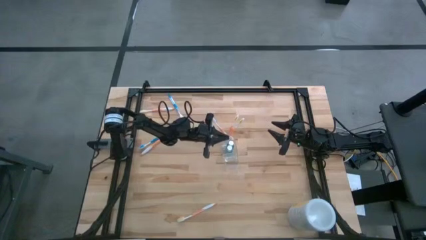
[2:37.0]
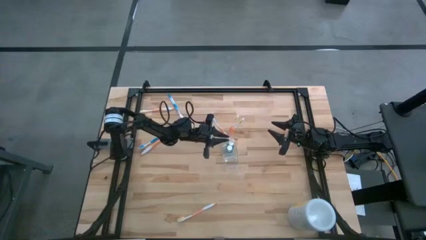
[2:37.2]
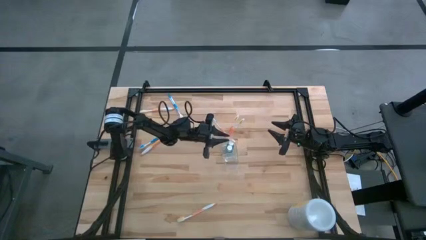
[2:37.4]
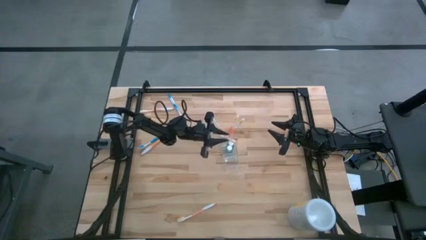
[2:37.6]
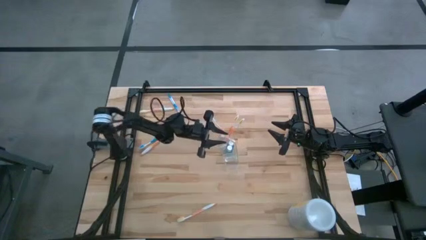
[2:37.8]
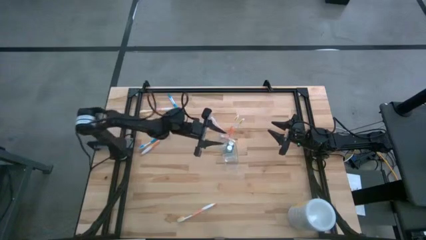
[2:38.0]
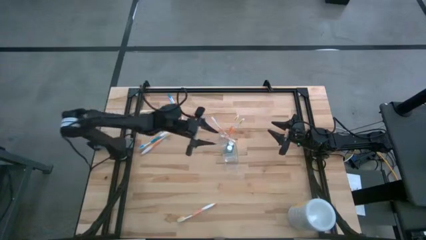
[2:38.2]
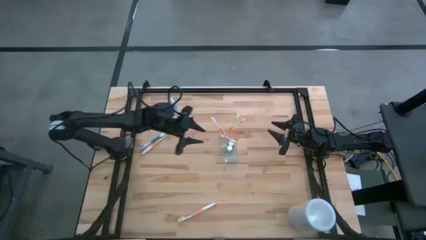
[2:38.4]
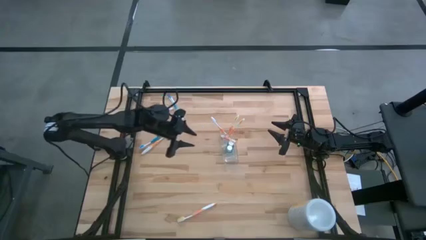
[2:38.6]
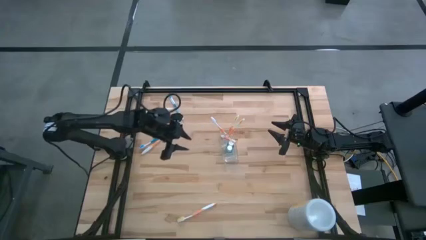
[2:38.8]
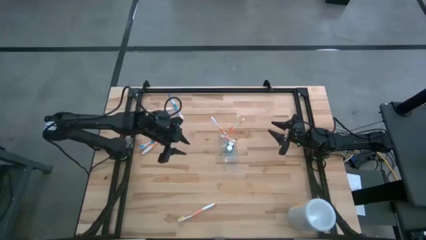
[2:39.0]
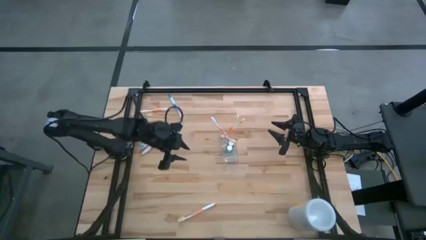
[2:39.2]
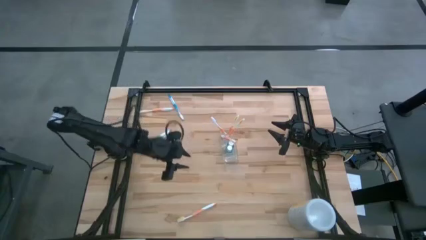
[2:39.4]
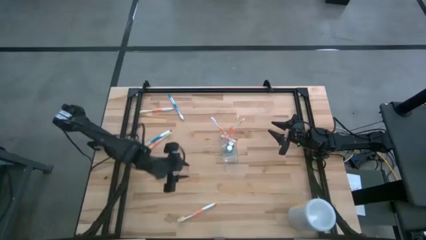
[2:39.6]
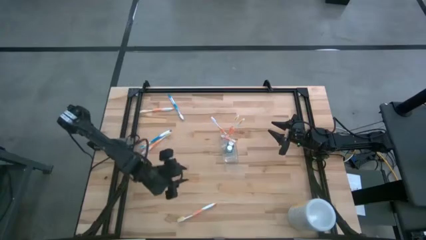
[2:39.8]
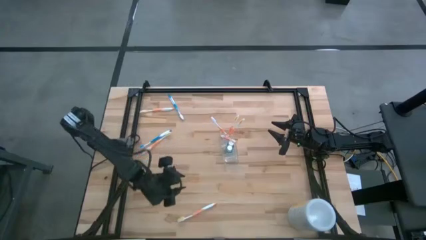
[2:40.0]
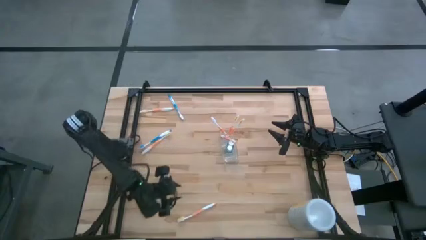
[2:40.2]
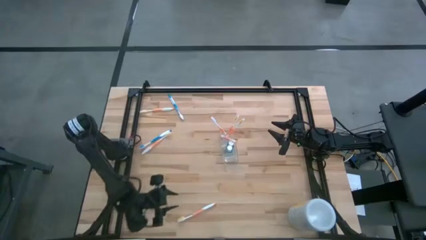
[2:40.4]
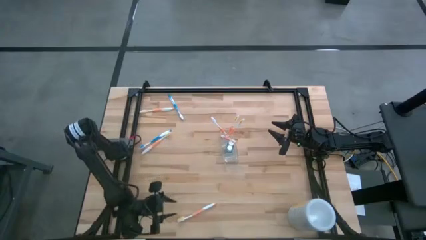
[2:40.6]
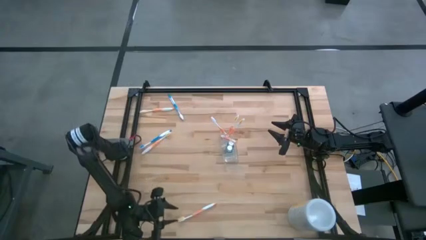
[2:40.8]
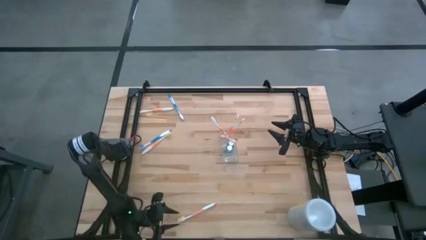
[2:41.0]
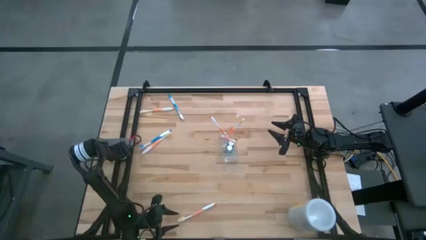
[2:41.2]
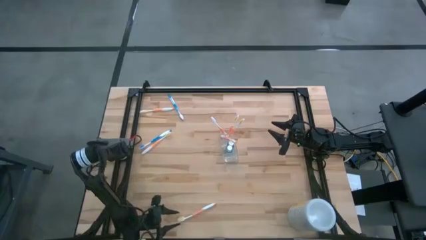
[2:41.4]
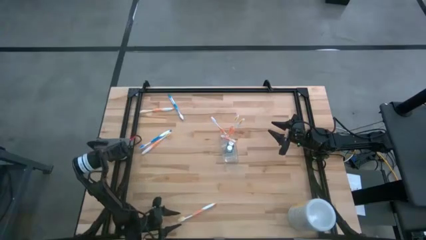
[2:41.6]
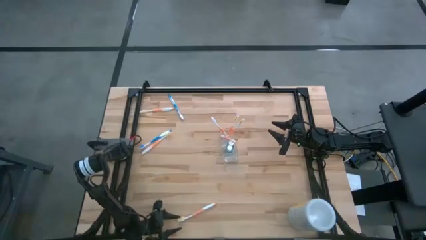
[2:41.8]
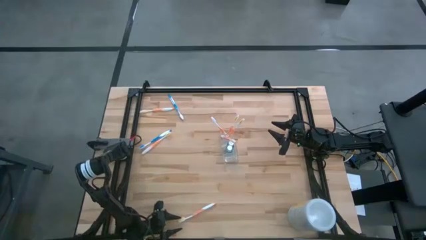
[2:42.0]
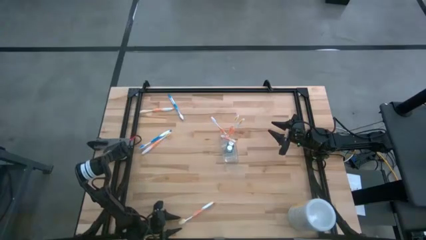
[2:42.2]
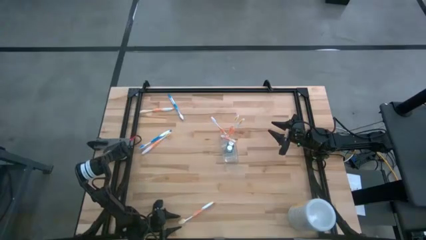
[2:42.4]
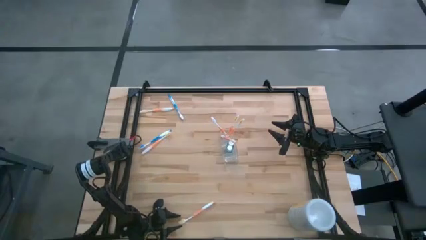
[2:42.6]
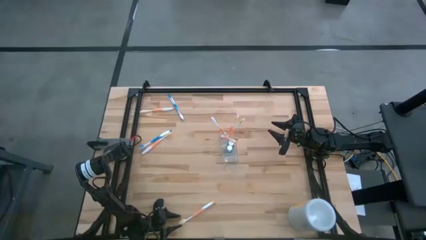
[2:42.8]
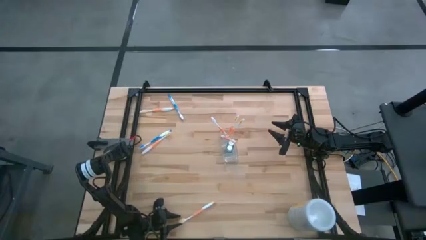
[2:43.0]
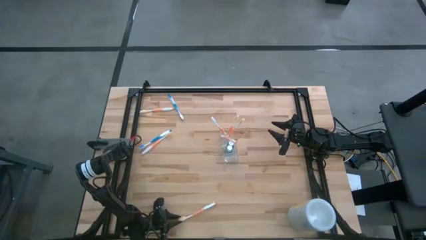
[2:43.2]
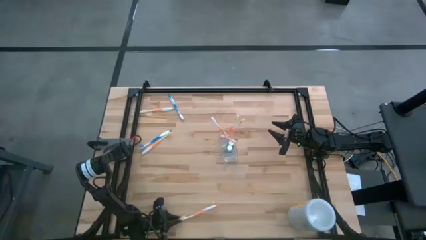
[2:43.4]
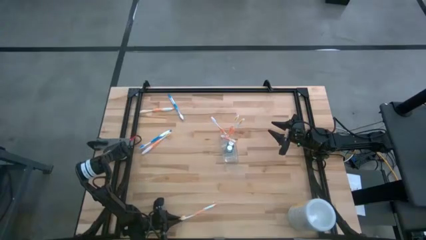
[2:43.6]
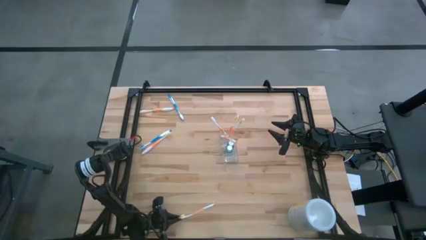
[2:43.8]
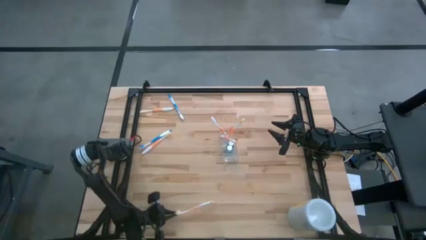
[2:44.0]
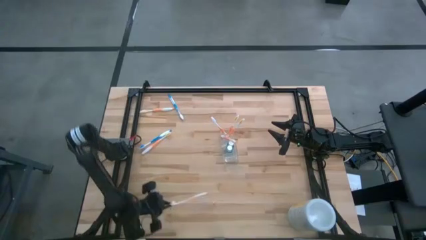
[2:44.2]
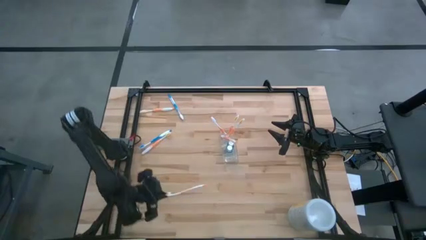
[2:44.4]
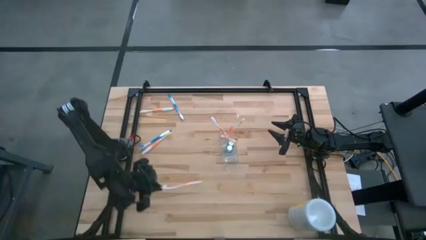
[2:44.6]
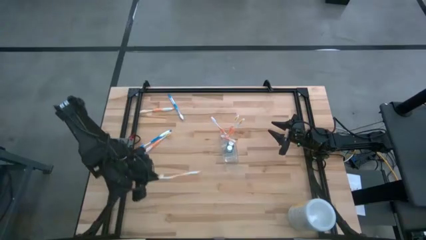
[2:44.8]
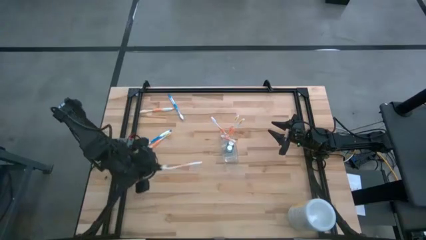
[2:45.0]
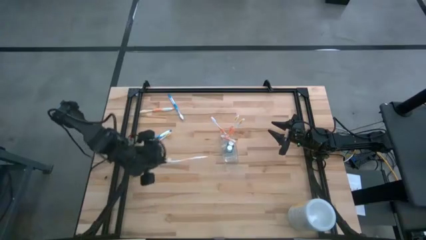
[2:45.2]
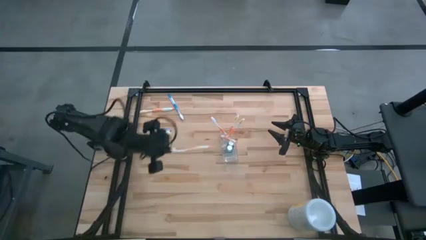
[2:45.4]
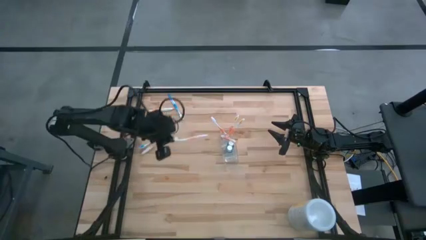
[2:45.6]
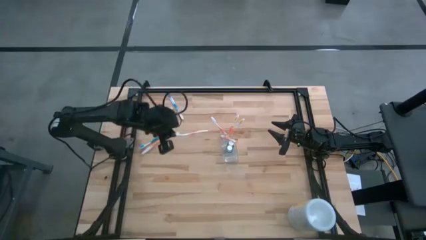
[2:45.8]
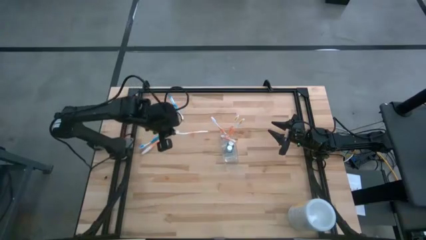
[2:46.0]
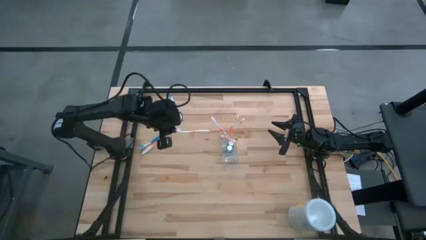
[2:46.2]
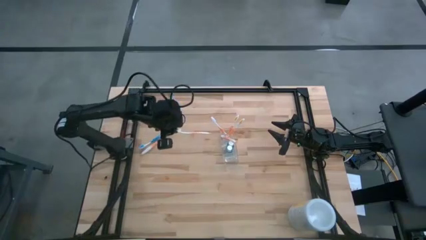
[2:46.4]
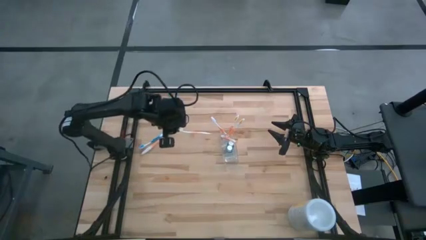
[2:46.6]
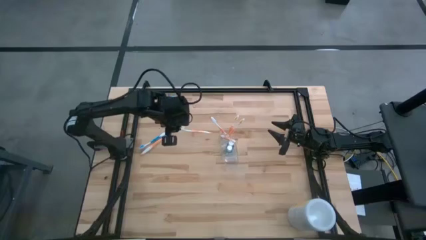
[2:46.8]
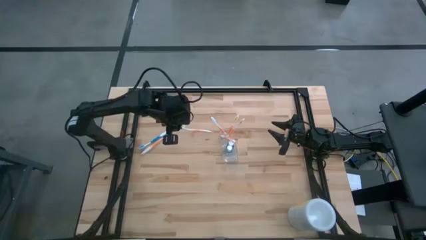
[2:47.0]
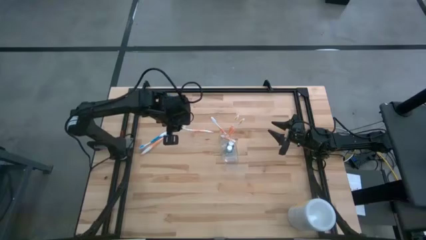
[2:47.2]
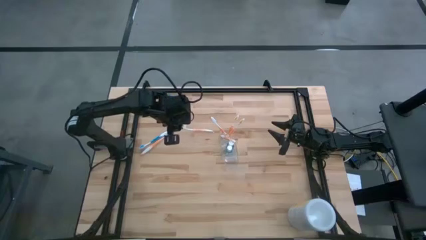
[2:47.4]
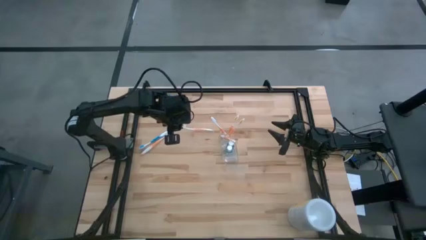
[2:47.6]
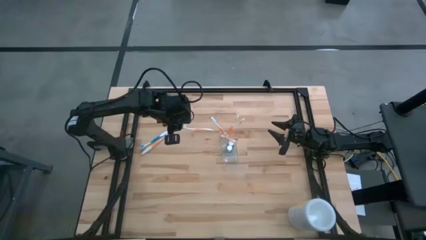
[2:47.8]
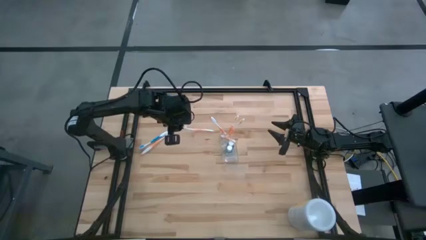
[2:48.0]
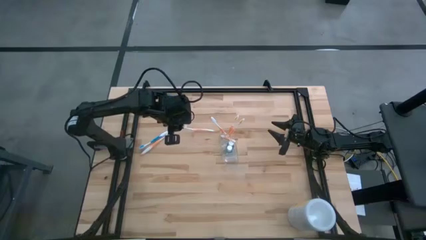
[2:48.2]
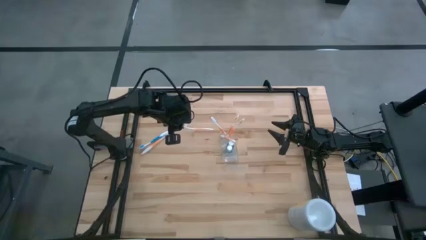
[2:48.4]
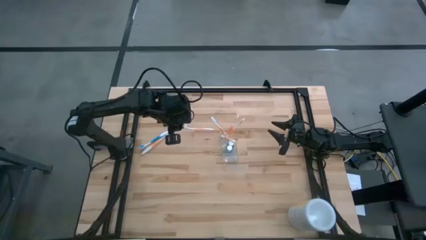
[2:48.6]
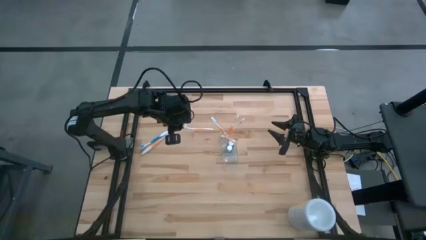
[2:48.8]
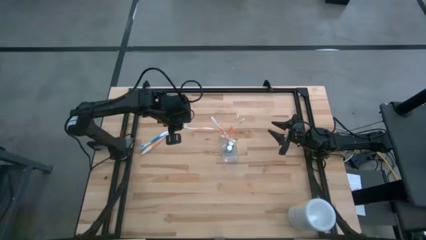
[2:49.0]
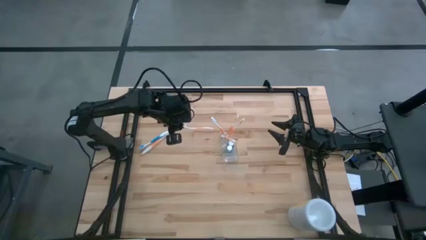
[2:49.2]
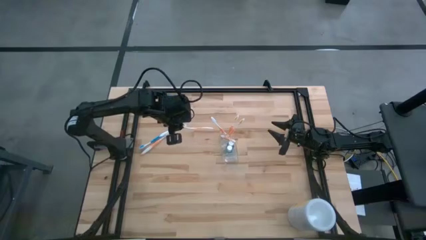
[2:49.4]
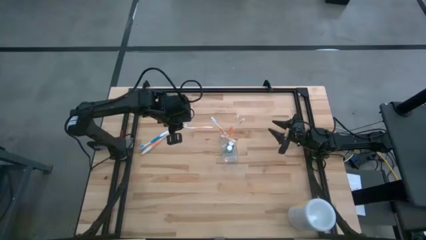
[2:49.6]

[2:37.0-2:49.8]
Task: Pick & Place toothbrushing station
Put the orange toothbrush into the transparent

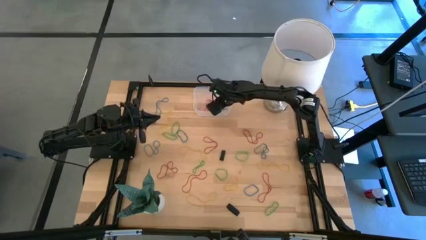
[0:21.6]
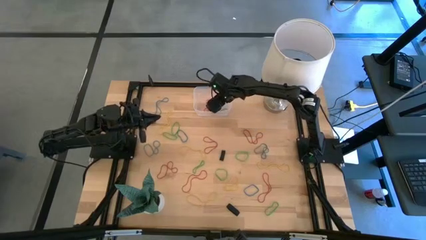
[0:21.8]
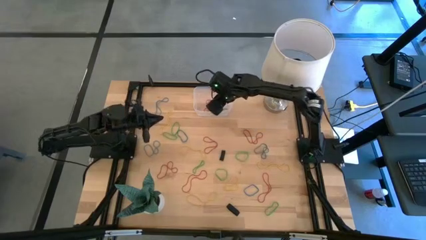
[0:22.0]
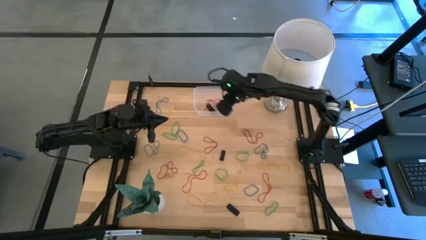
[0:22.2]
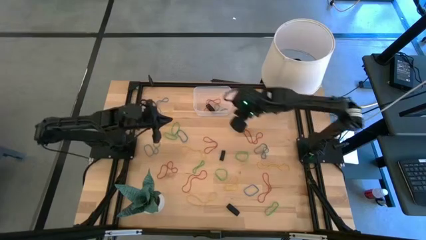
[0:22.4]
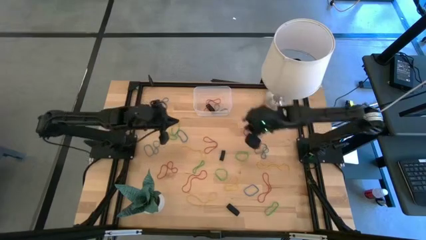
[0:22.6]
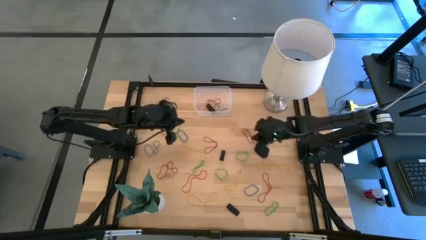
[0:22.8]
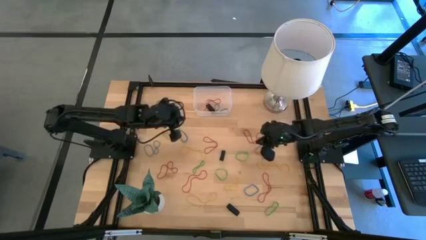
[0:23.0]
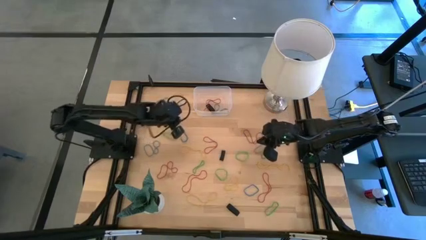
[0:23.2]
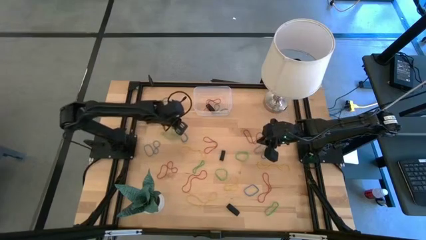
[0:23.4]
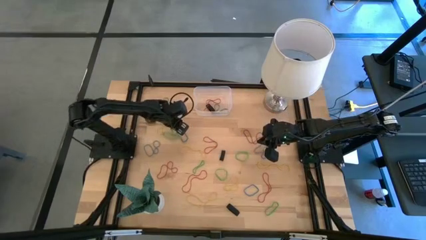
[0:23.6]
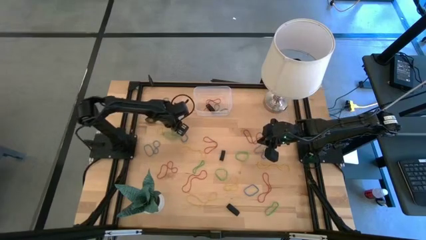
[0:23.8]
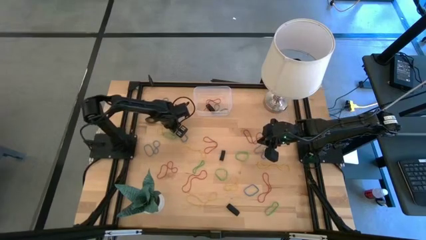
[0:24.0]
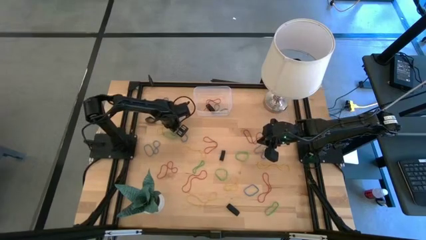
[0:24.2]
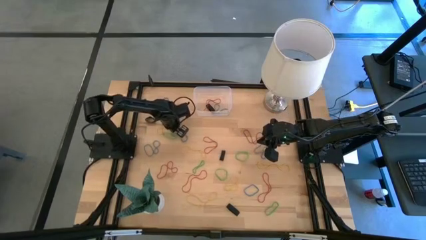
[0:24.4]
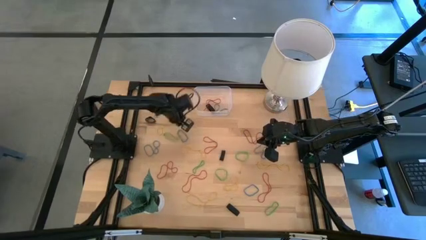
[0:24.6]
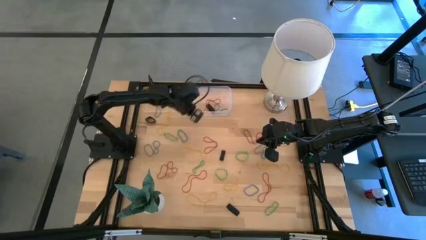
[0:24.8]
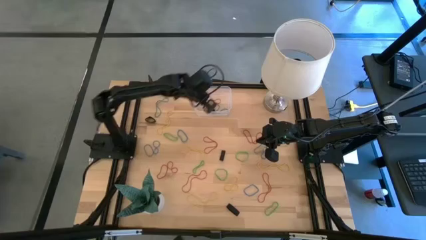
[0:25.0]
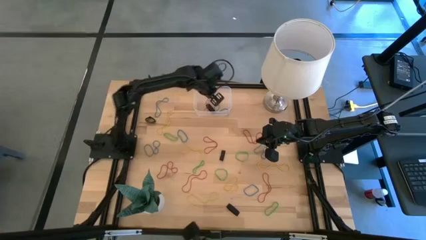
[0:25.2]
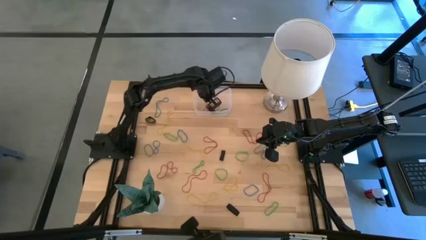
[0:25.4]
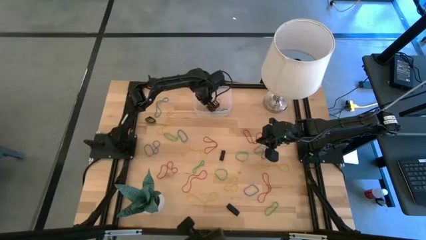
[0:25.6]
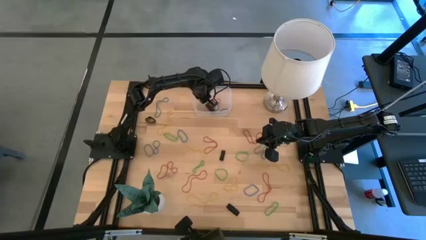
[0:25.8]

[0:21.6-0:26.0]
Task: Pick and place rubber bands into bin
Put the green rubber band into the transparent bin
